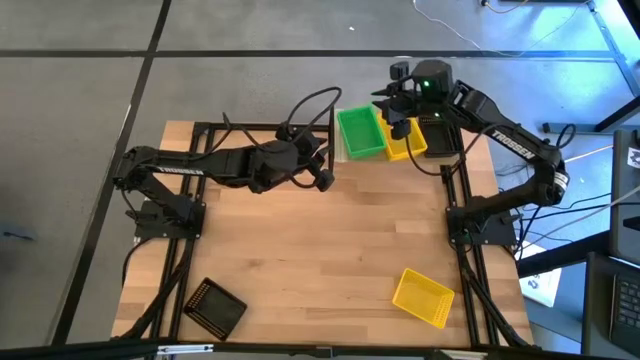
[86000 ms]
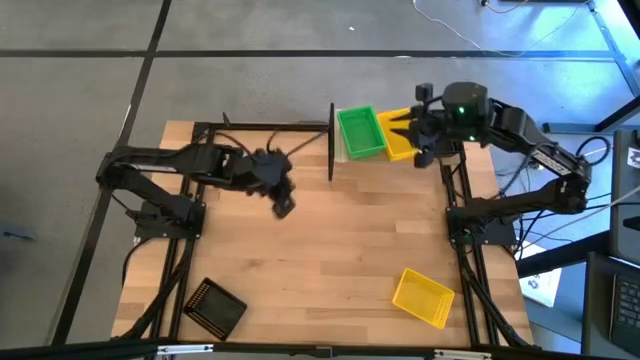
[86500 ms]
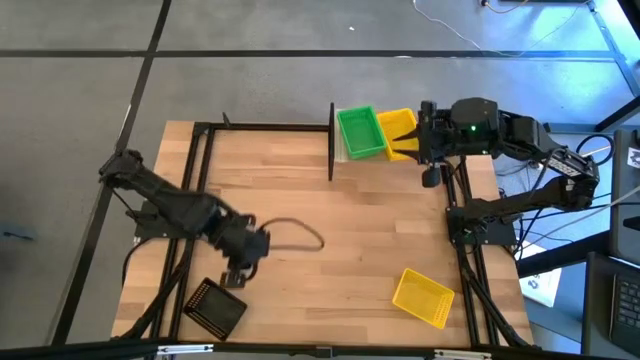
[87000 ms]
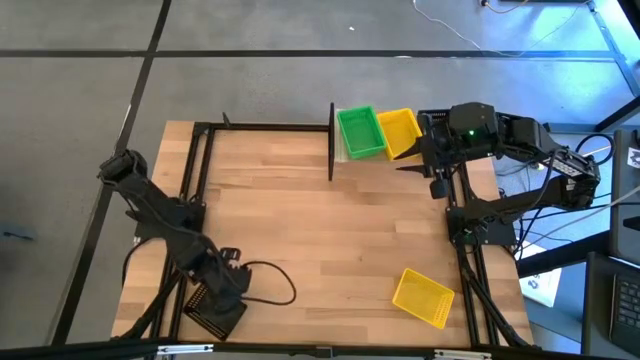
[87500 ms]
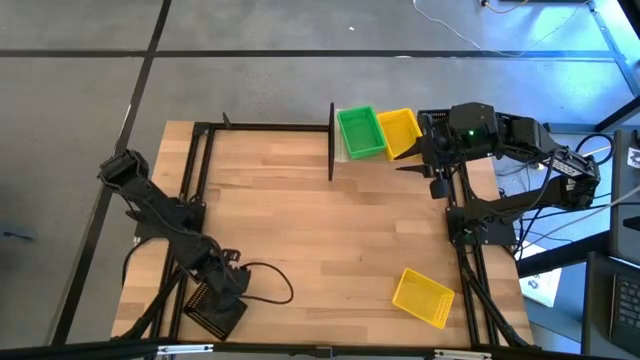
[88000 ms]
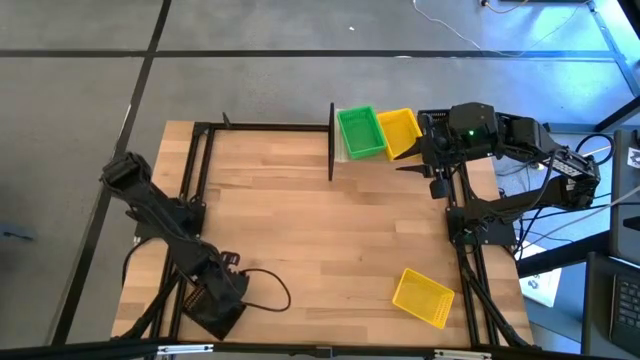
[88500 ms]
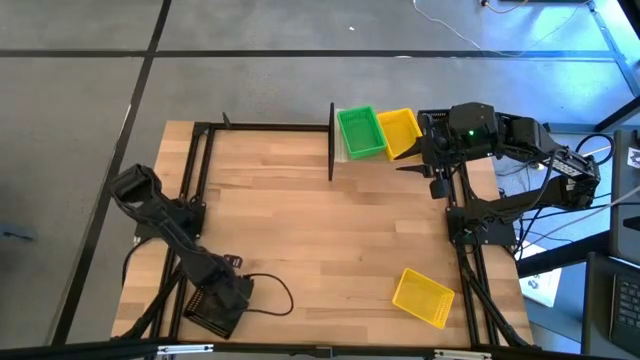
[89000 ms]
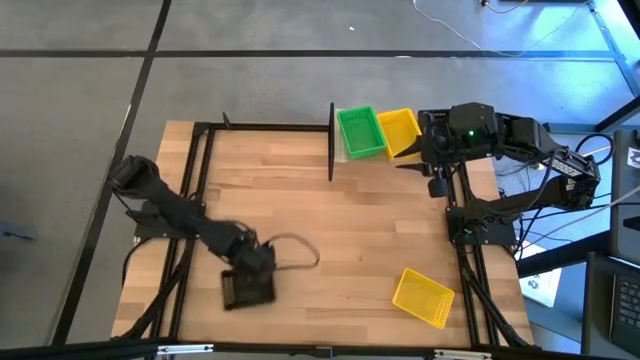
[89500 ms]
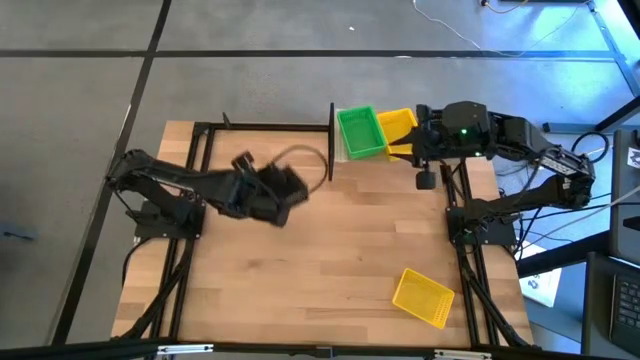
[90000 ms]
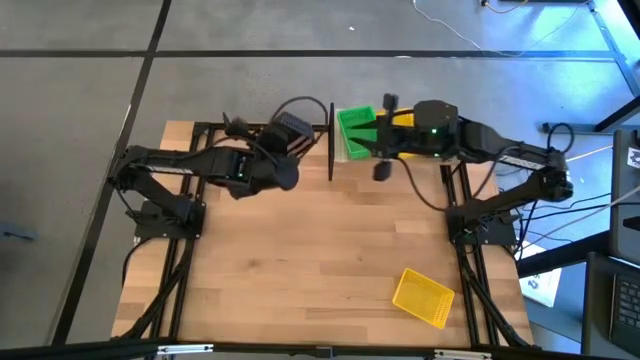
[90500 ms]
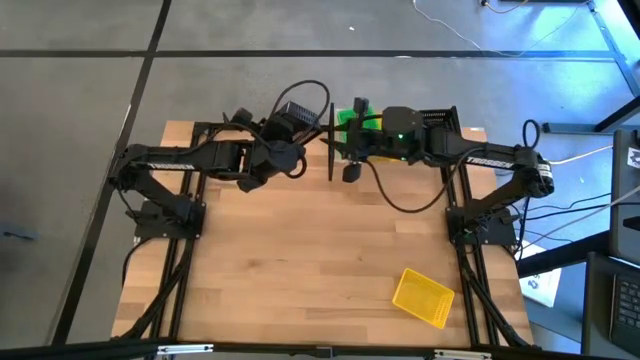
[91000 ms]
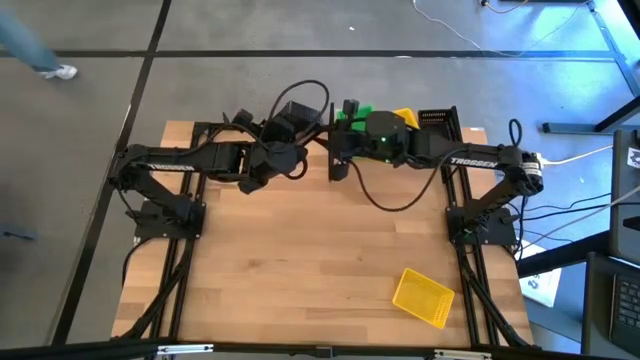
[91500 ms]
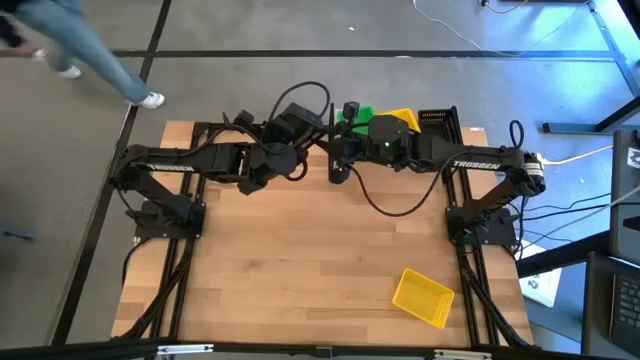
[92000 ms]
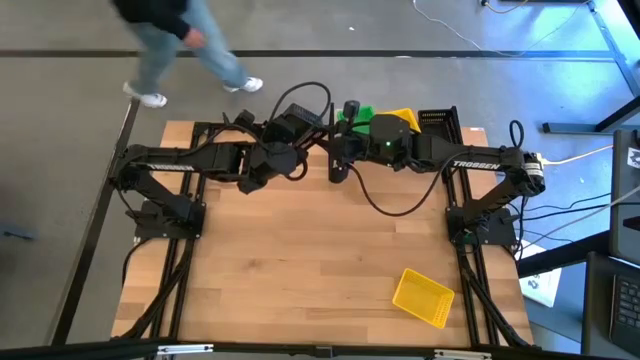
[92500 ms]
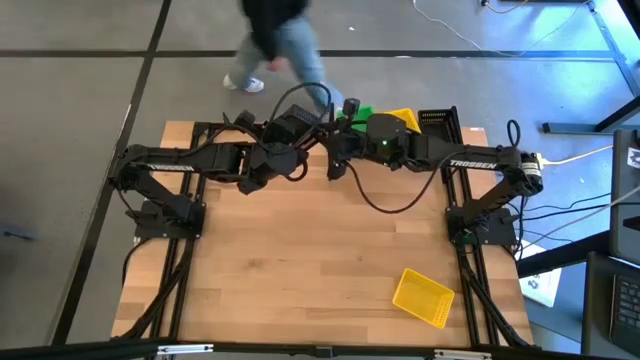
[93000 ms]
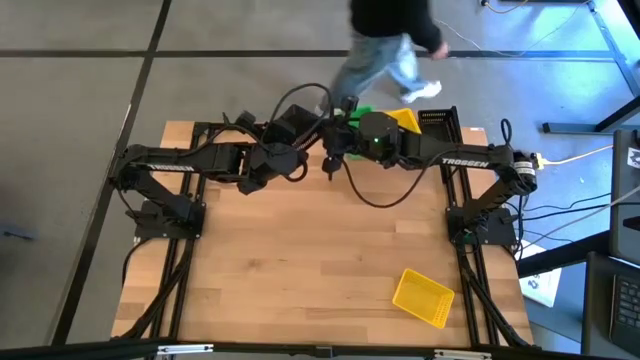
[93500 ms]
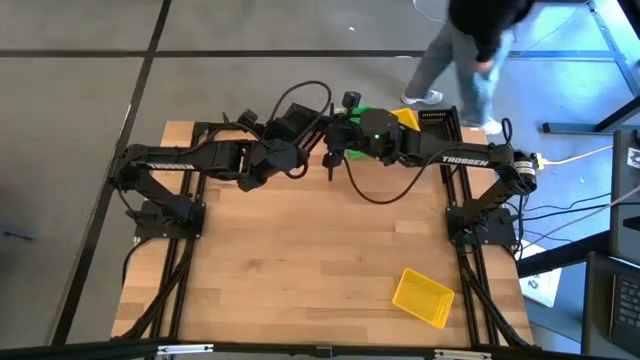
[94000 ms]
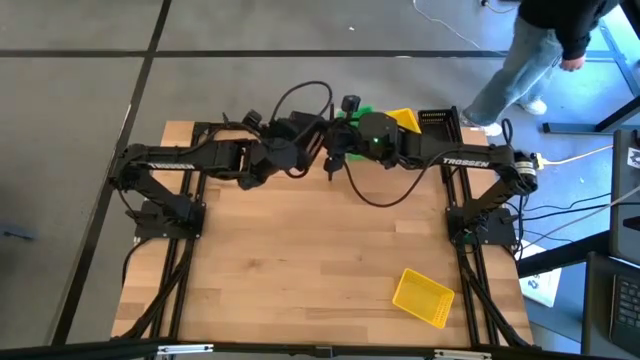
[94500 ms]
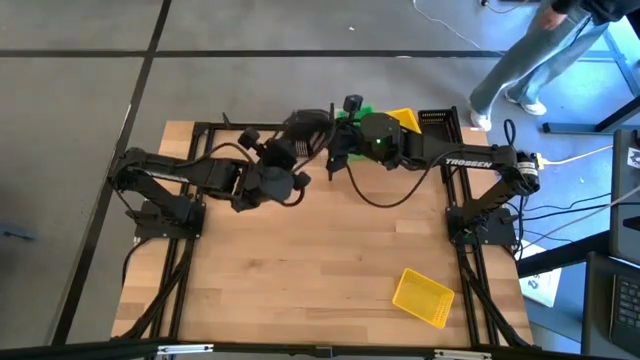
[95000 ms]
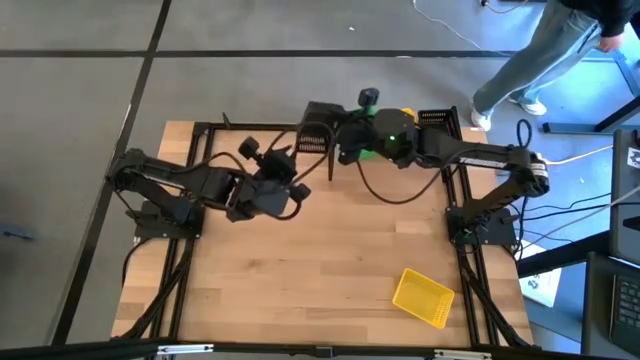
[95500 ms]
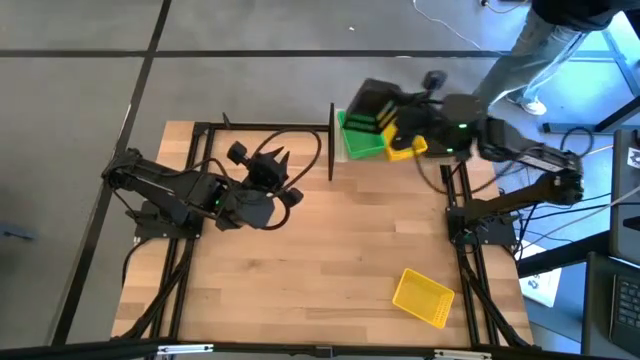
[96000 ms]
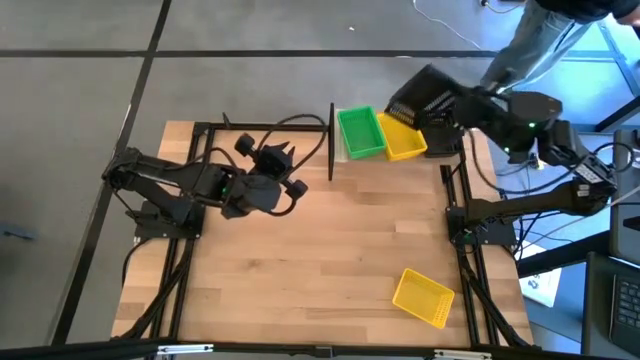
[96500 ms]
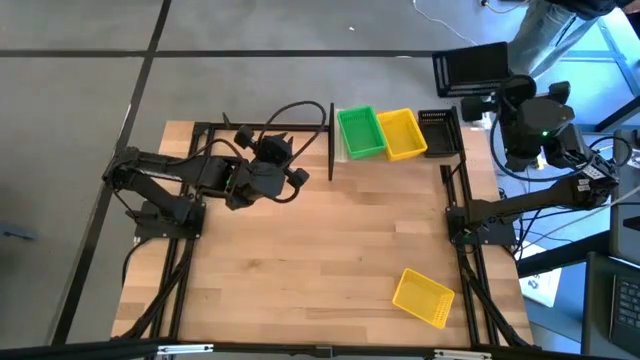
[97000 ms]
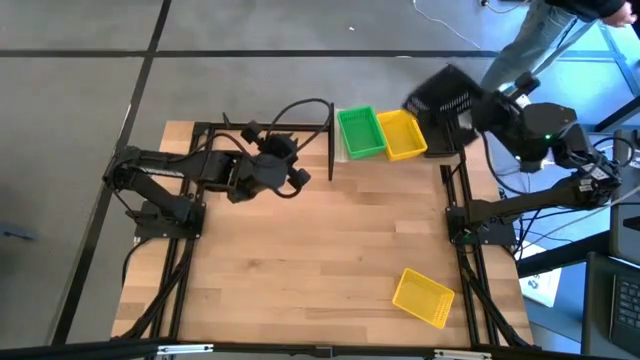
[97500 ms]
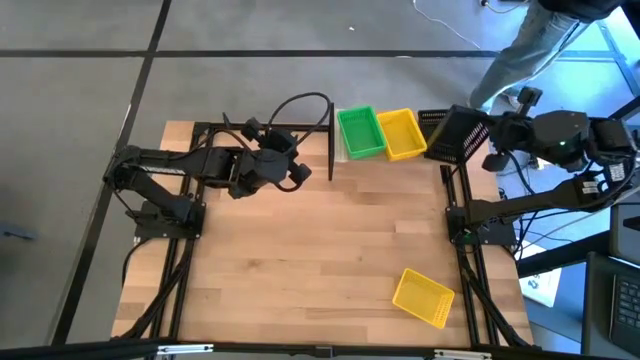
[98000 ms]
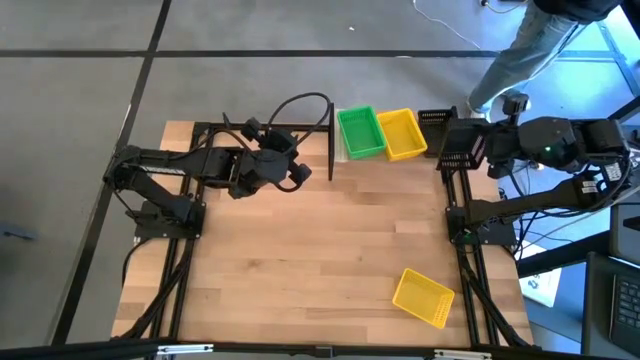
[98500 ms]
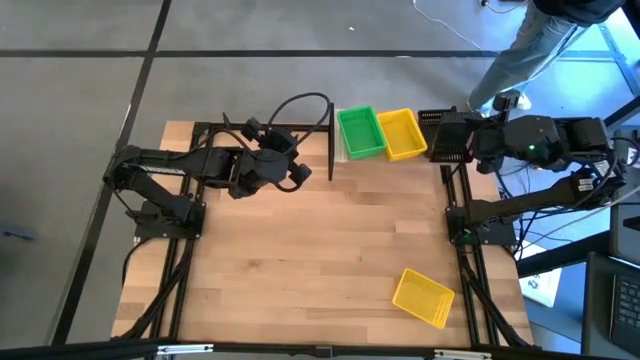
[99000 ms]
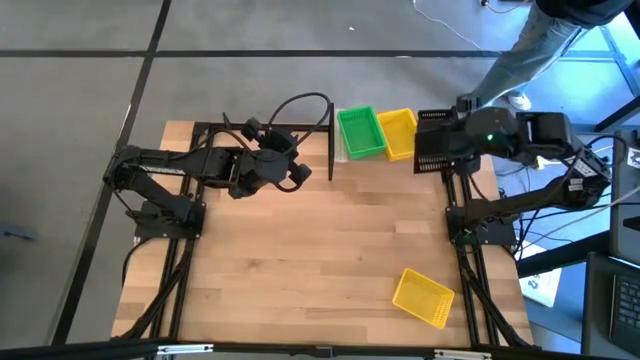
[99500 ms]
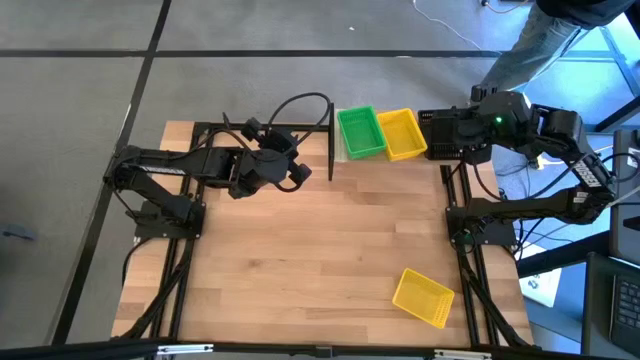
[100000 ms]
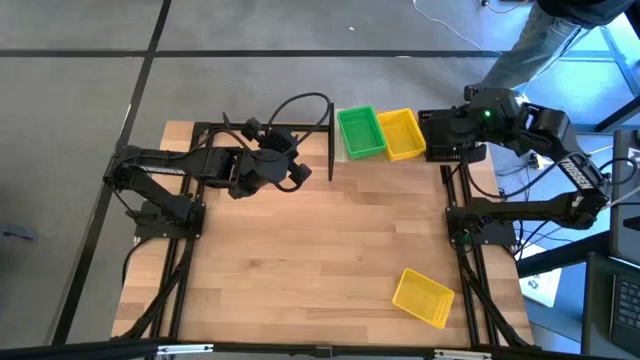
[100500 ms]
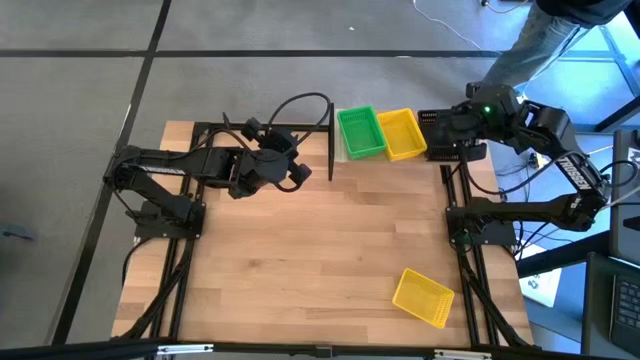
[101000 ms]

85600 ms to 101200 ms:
Task: Stack baskets on shelf by color
Stack the black bin on the black bins on the shelf

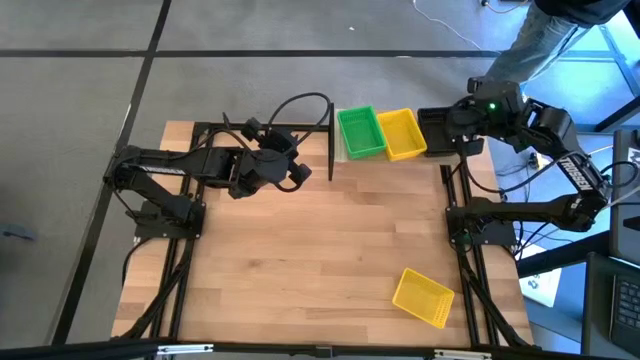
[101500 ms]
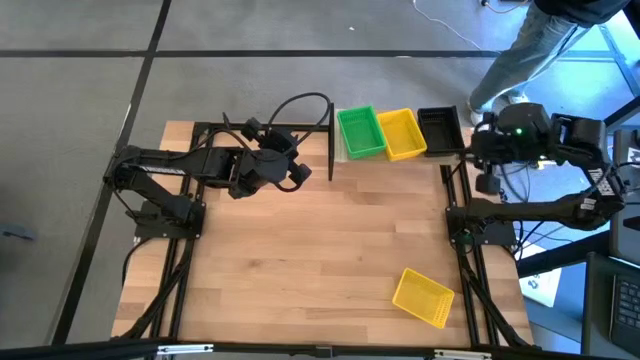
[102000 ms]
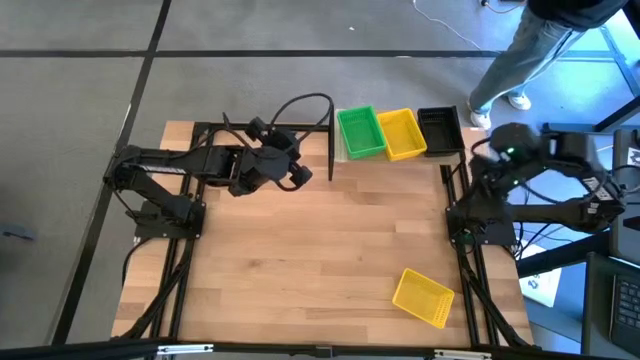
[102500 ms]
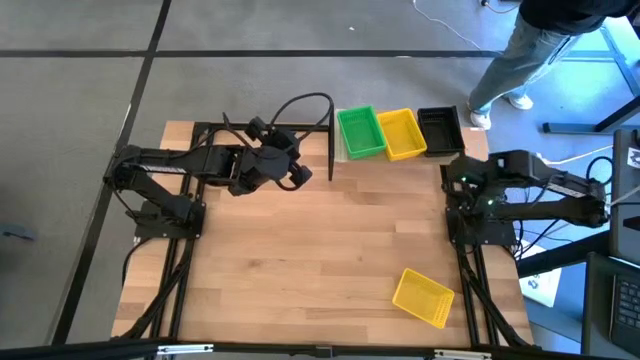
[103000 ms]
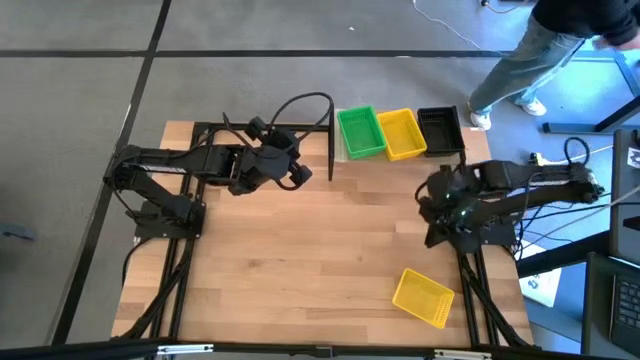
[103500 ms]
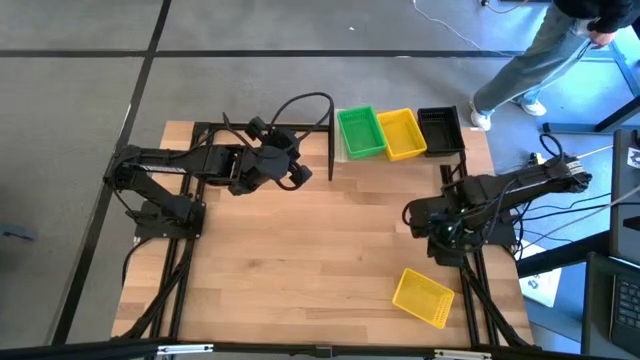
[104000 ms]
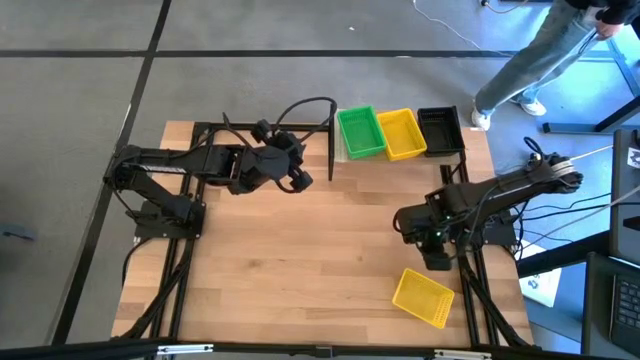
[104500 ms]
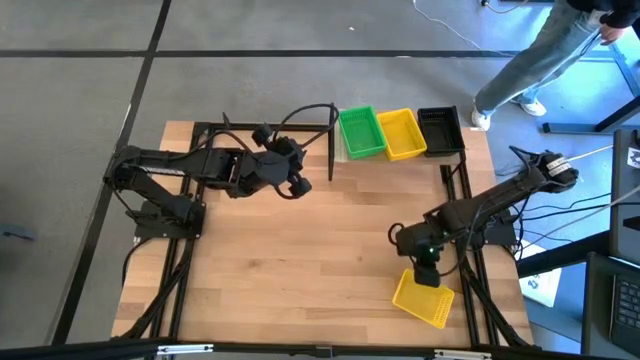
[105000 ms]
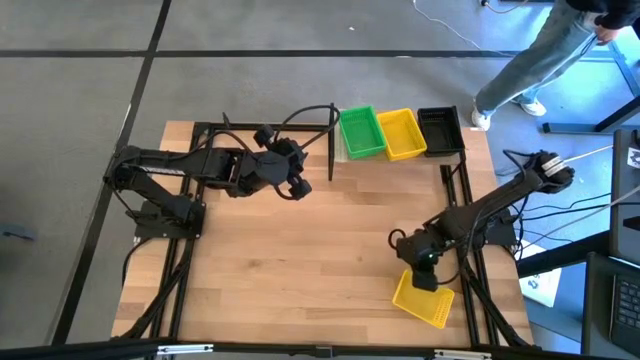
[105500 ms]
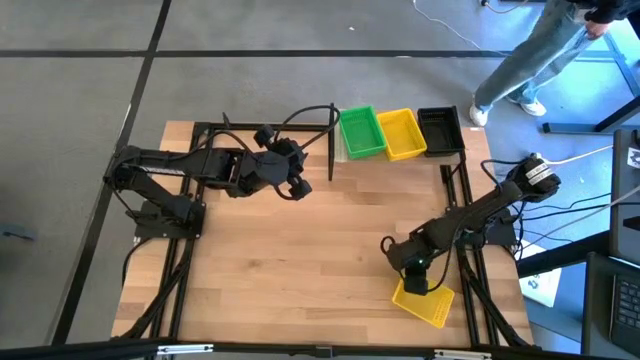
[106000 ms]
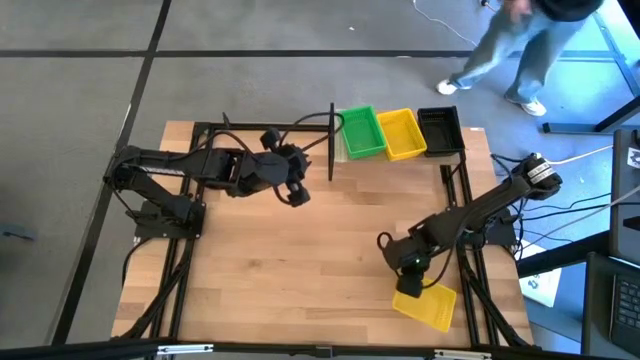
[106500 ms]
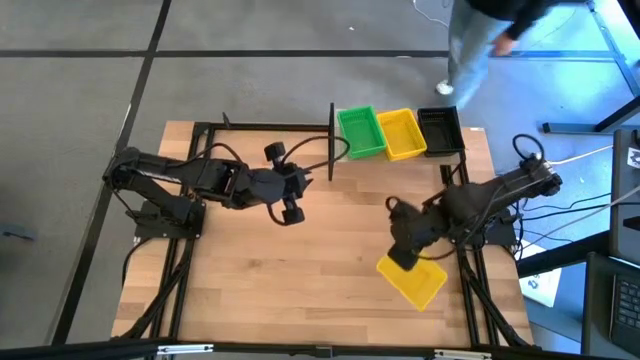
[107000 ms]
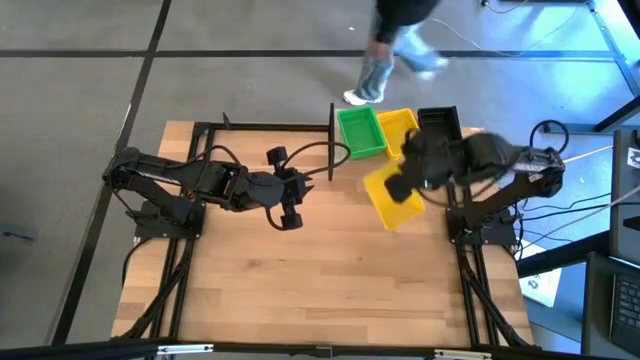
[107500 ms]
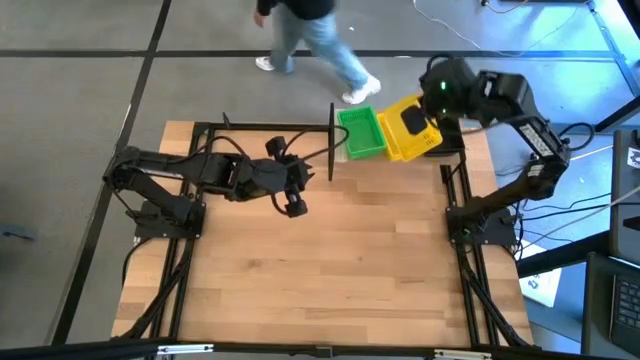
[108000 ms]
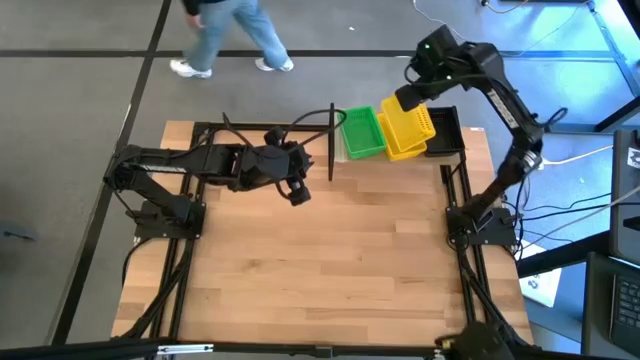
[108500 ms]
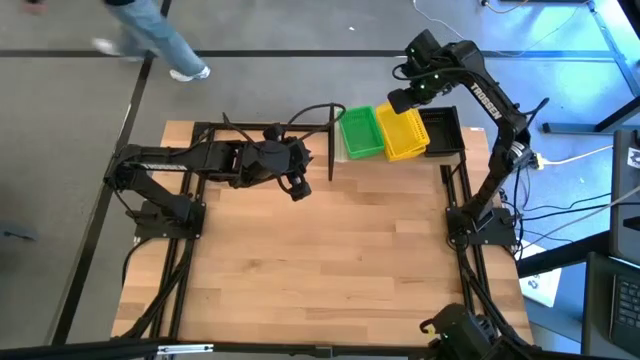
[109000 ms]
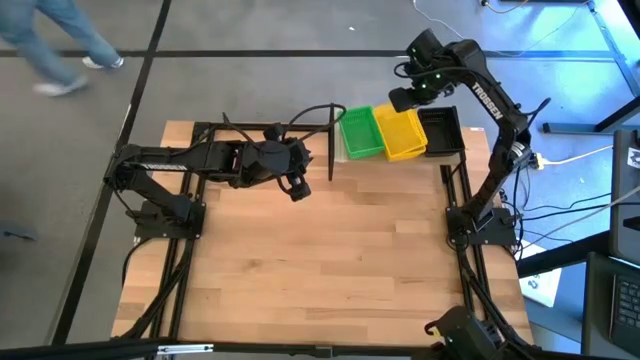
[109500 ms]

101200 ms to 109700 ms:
Stack the yellow bin on the yellow bins on the shelf
